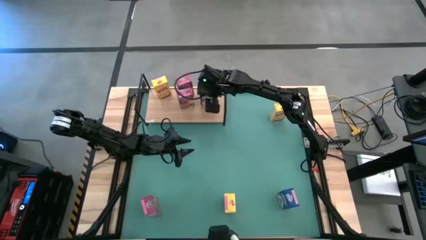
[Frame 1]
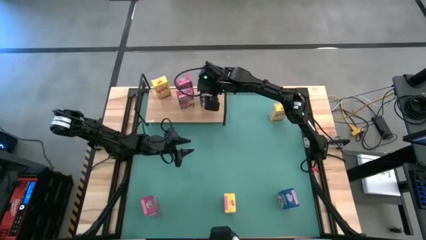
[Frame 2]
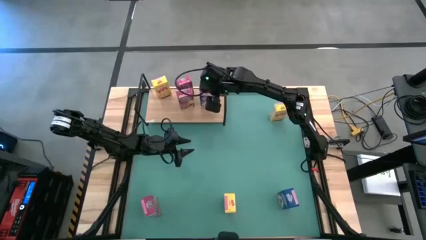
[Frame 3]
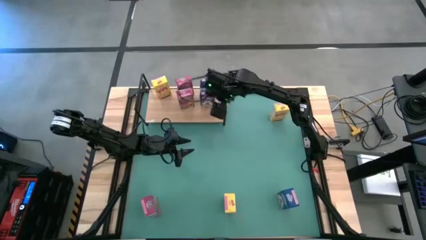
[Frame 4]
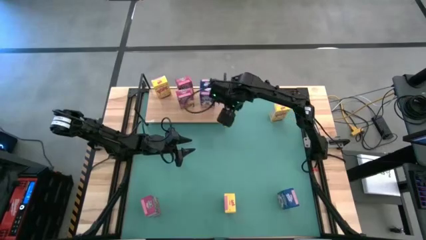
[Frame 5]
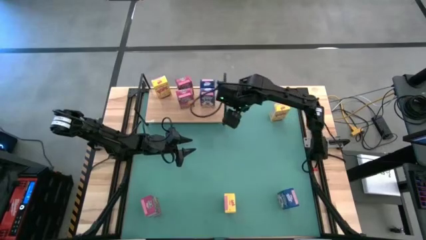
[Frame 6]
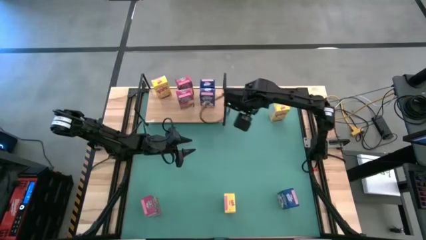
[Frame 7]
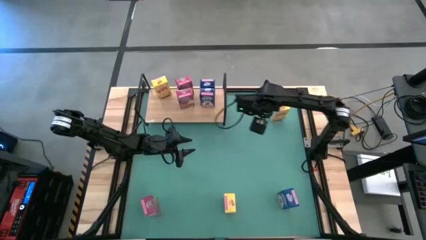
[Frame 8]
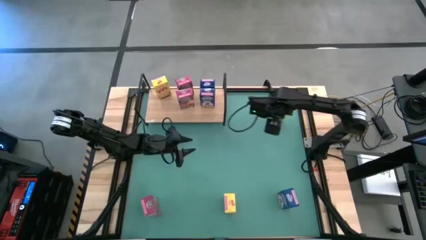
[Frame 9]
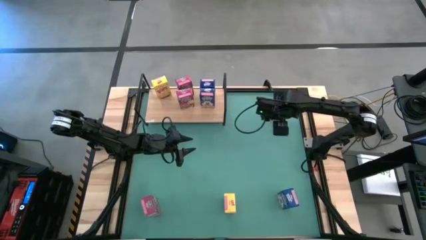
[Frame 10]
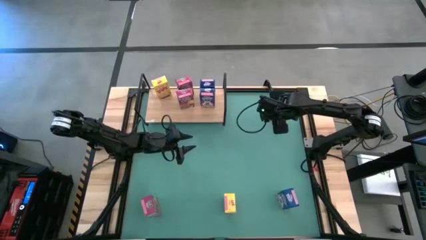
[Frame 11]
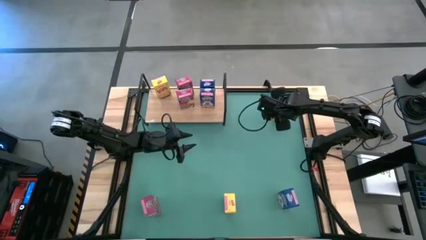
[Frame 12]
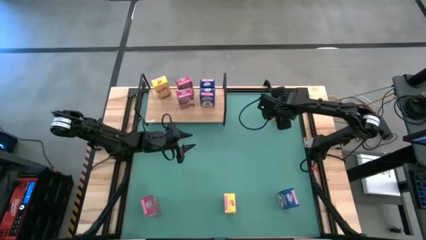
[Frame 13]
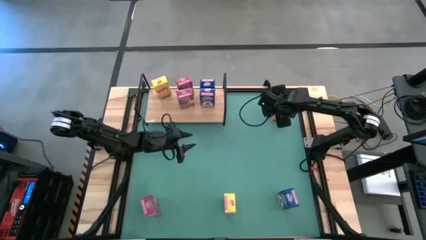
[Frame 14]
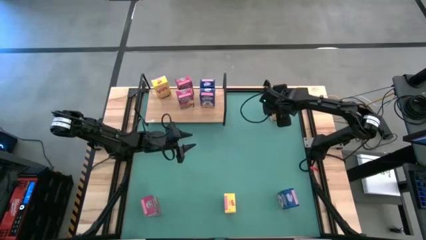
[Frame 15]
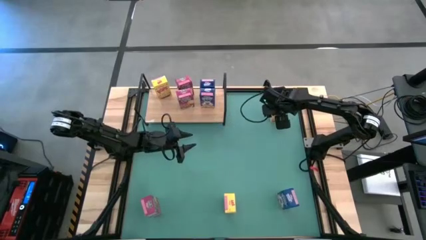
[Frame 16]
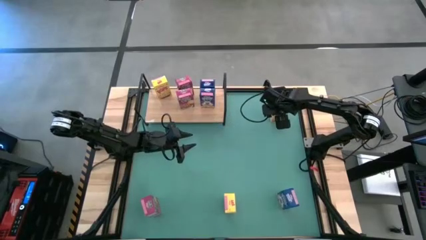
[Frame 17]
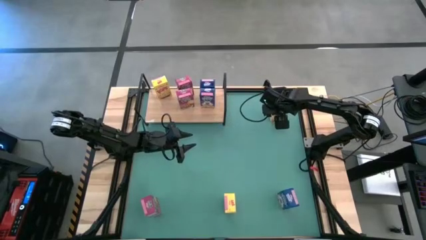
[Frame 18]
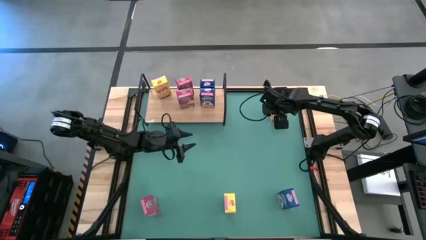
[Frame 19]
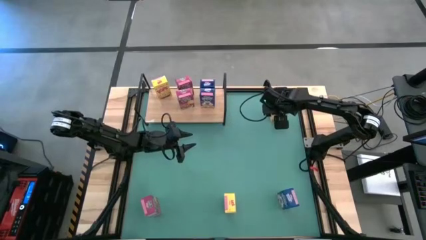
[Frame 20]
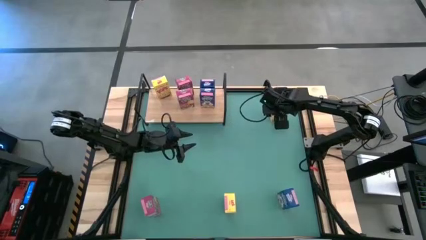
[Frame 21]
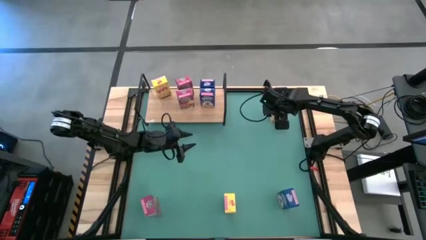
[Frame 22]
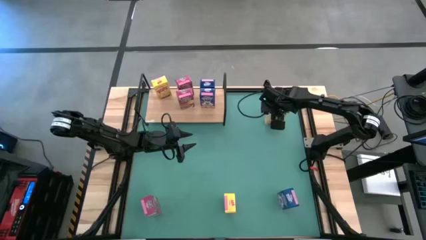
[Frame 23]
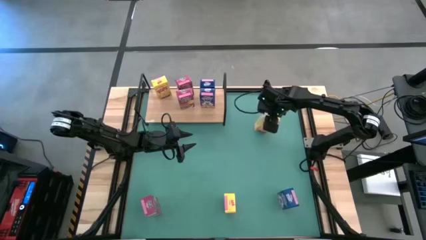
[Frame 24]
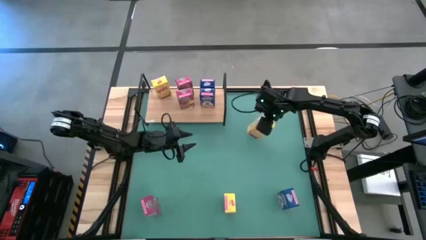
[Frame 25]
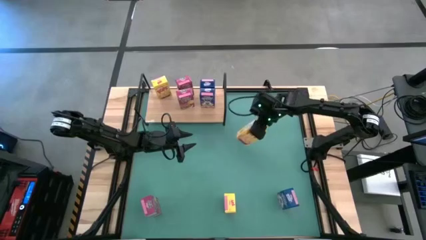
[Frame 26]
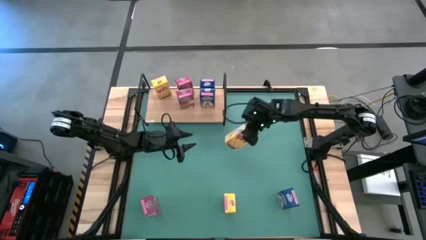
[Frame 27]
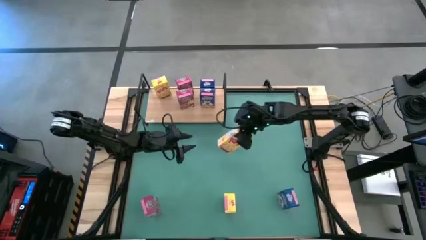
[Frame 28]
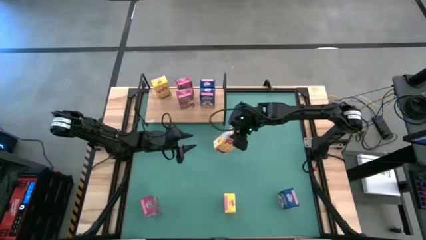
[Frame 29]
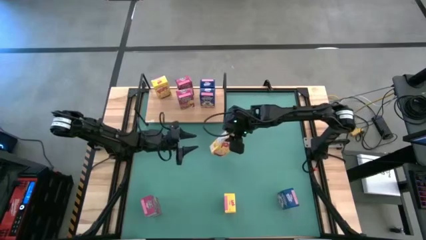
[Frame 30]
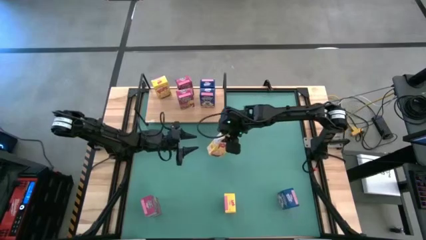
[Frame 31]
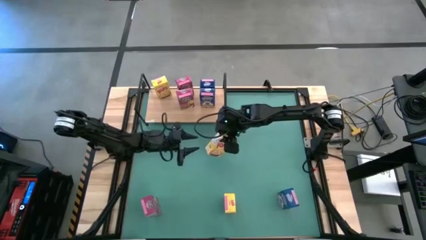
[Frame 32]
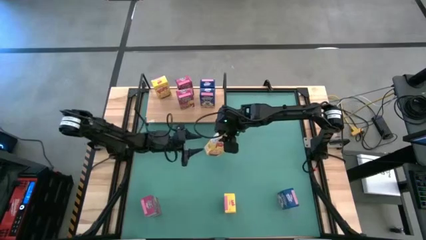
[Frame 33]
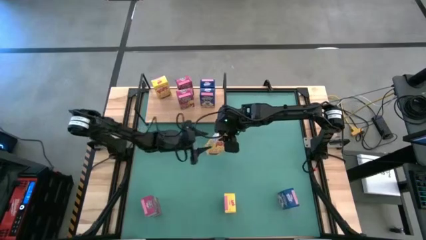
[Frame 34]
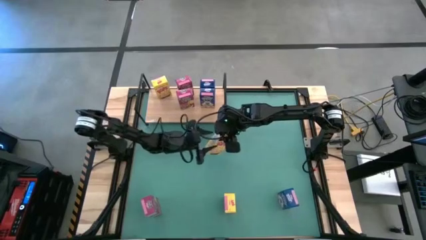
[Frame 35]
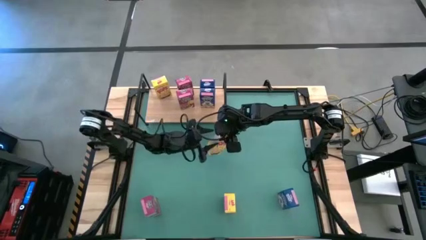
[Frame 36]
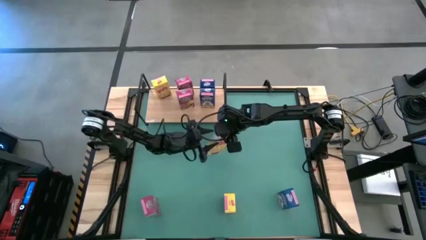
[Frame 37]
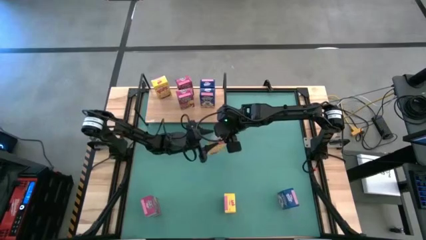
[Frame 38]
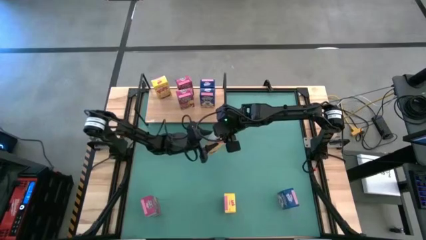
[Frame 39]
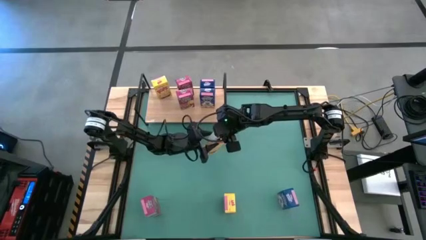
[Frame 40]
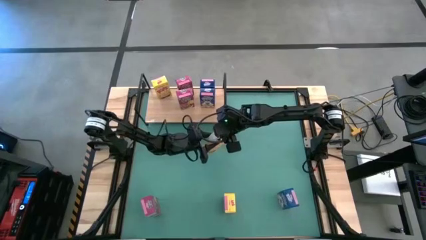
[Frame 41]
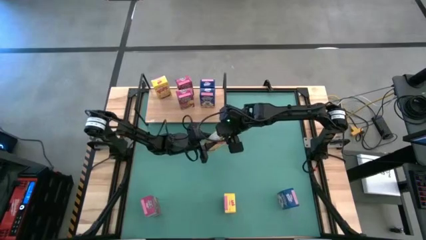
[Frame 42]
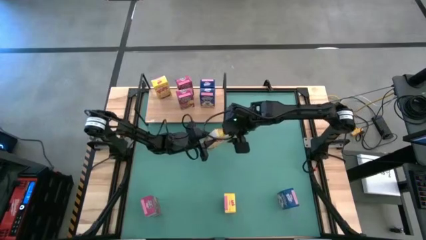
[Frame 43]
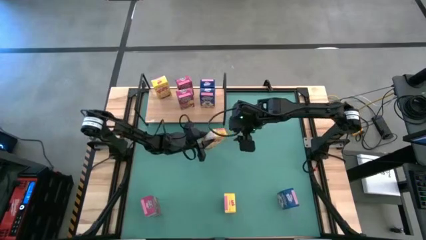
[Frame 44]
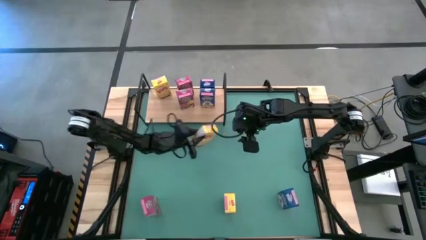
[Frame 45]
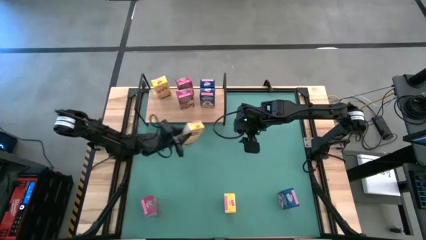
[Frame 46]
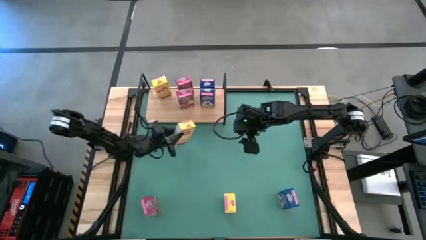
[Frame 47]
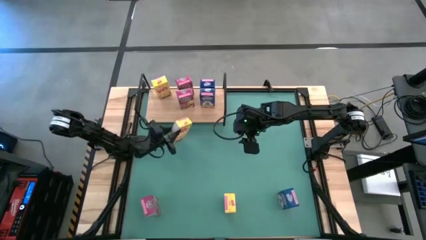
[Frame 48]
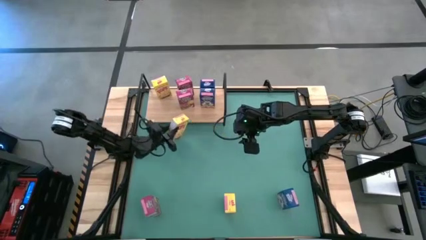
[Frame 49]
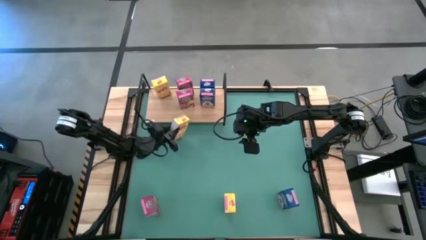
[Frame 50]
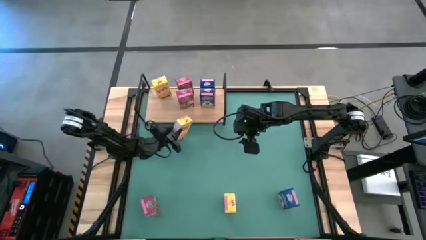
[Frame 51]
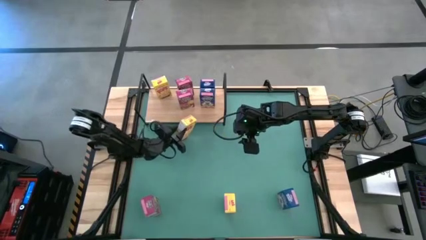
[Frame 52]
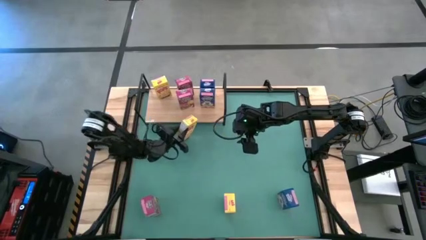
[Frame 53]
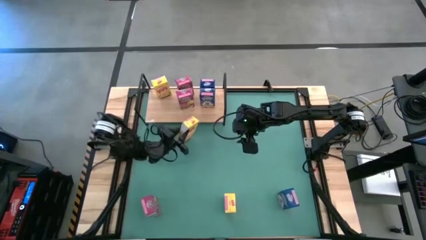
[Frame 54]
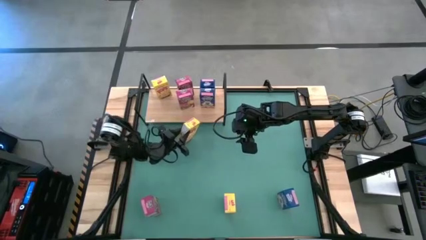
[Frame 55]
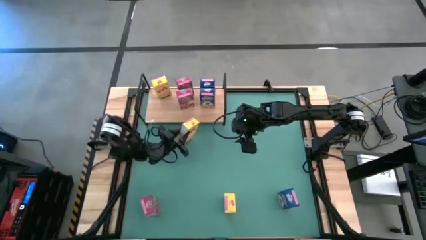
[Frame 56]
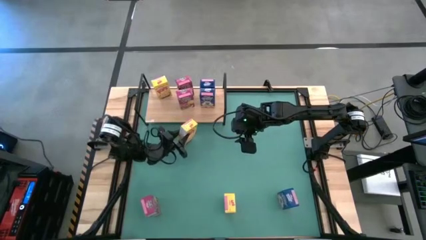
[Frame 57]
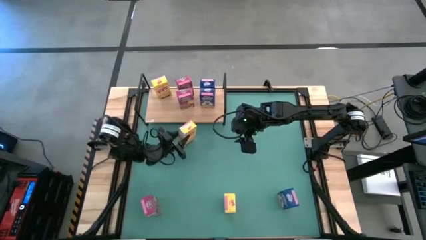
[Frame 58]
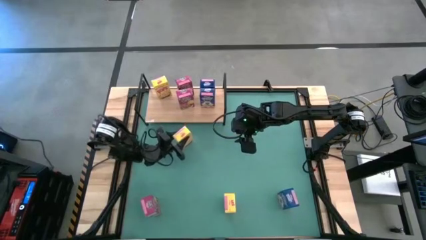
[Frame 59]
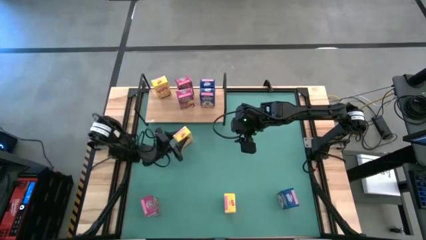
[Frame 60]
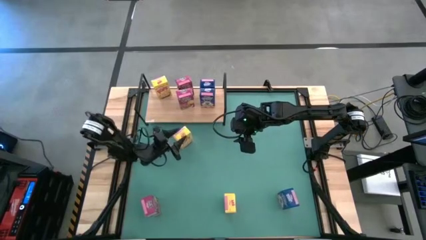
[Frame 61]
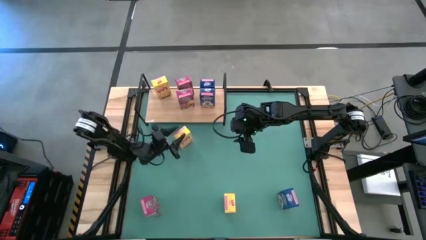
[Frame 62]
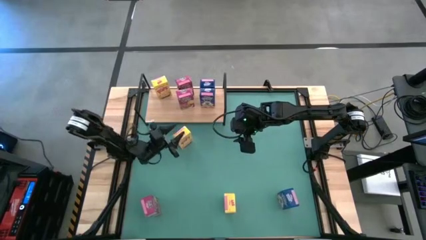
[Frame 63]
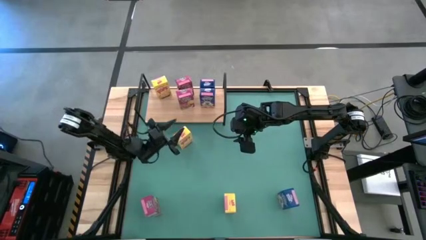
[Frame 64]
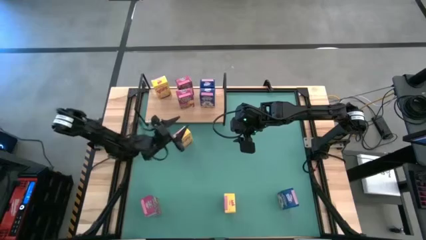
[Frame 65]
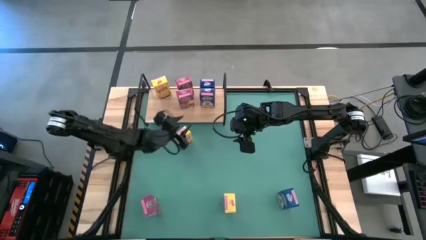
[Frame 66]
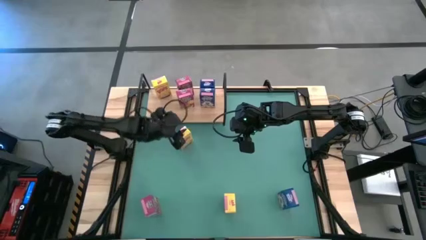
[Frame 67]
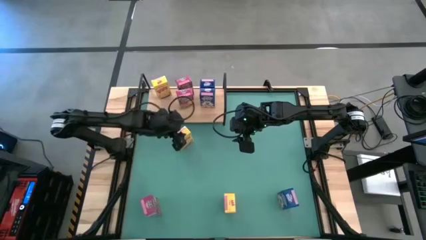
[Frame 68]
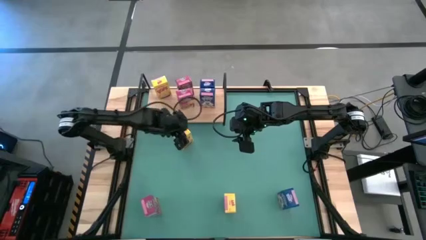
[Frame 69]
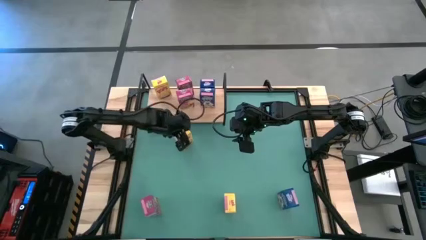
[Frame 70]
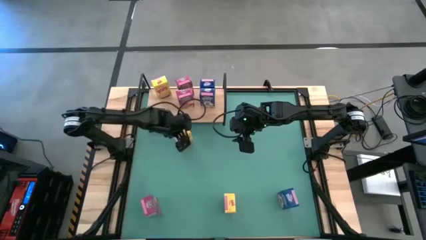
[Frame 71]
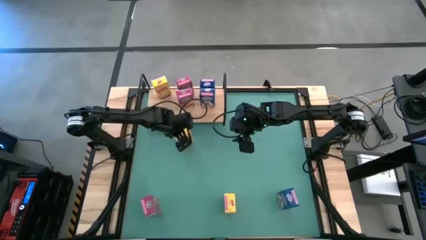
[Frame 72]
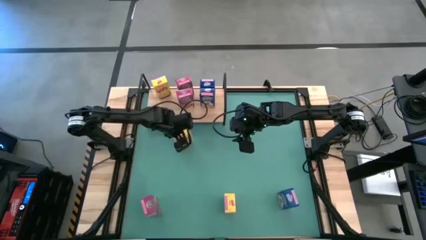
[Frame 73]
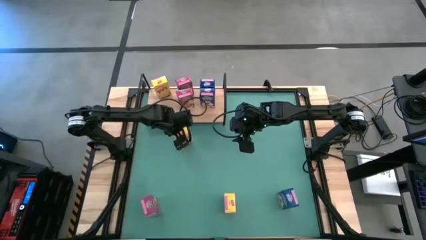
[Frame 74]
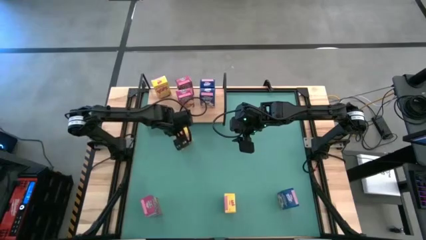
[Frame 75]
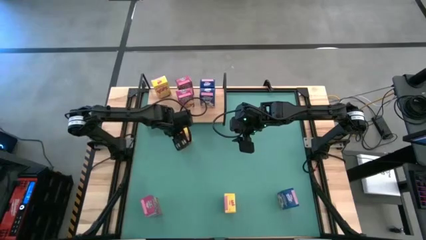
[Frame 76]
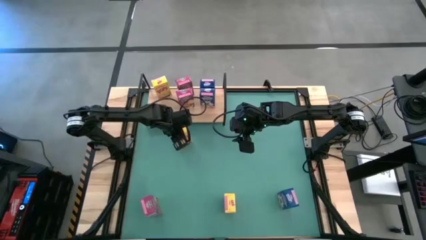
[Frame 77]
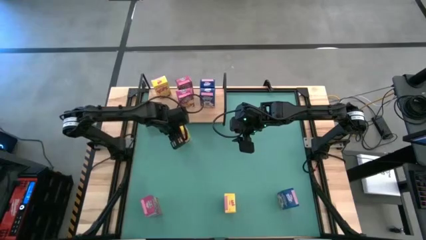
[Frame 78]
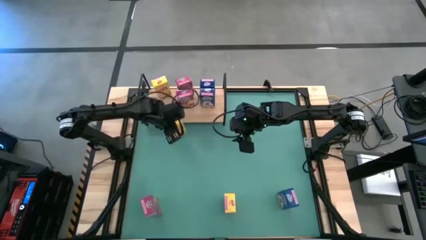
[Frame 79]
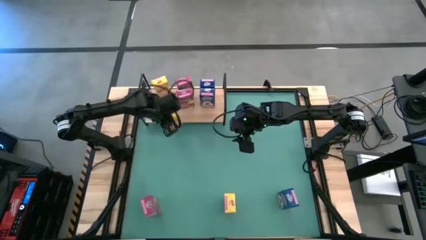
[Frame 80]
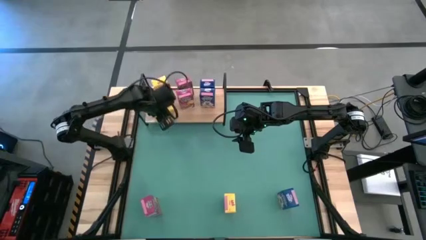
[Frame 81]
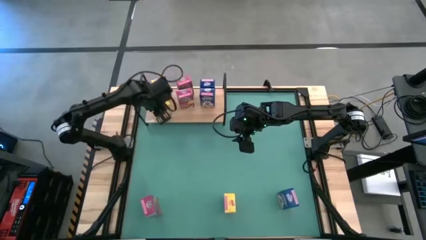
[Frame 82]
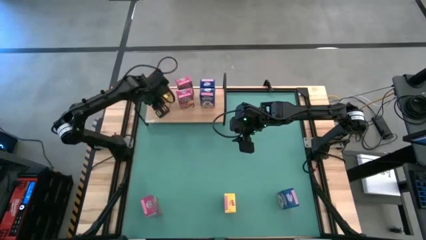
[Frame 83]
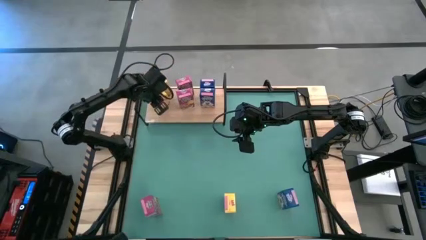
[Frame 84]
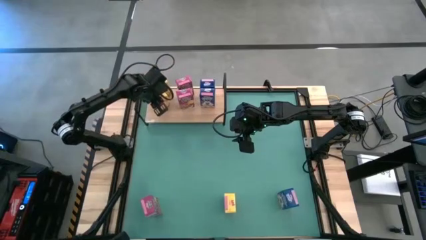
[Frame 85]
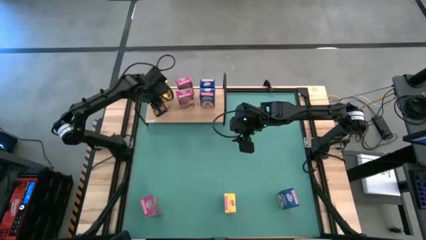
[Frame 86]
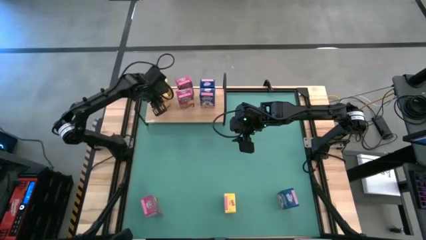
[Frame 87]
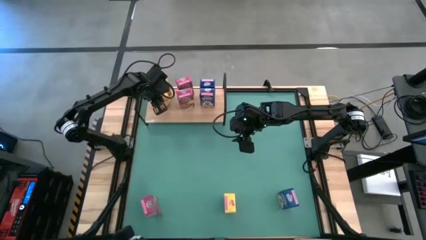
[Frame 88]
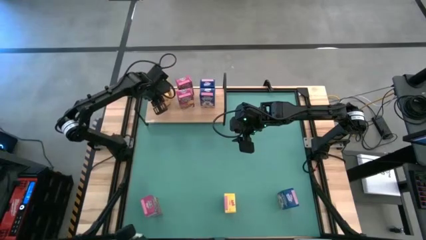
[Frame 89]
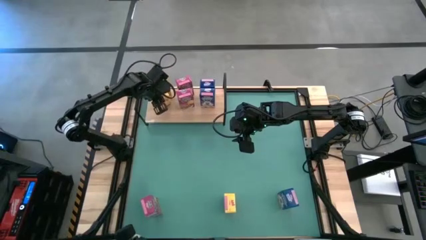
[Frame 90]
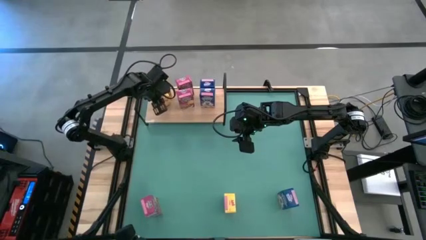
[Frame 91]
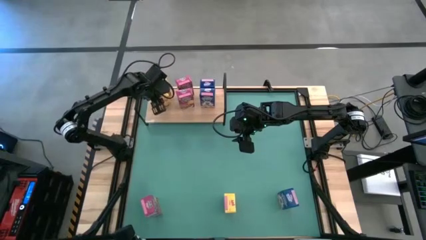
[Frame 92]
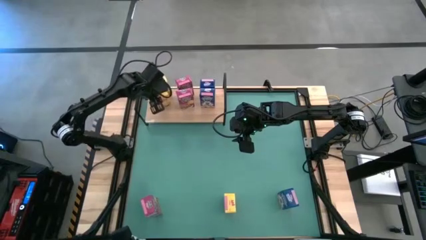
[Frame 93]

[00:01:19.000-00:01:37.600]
Task: Stack cereal on shelf
Put the top yellow cereal box on the shelf aligned with the other yellow cereal box
